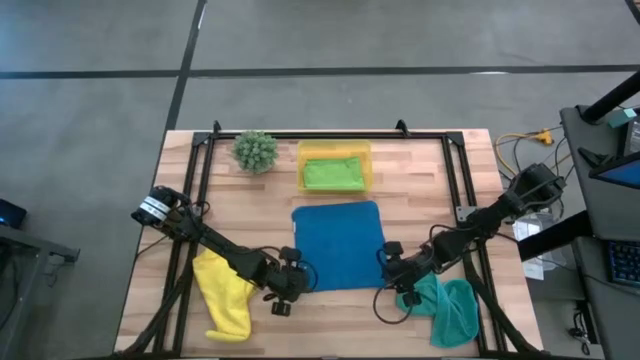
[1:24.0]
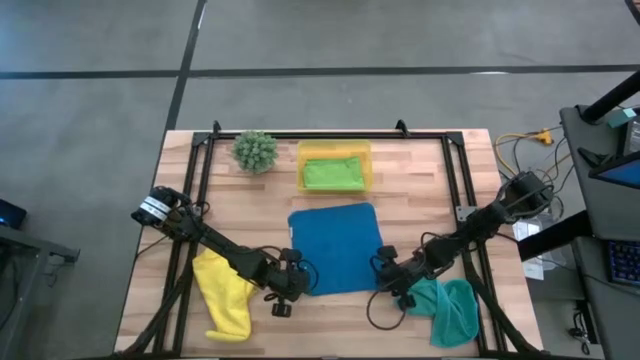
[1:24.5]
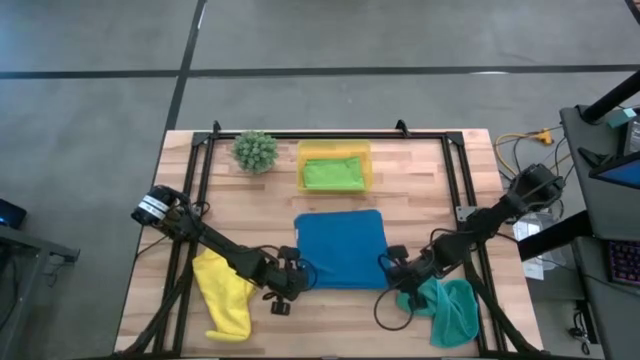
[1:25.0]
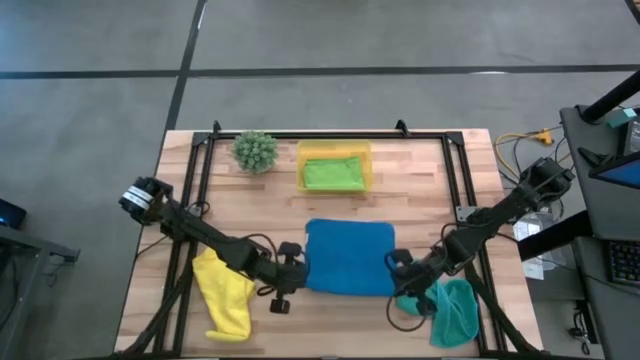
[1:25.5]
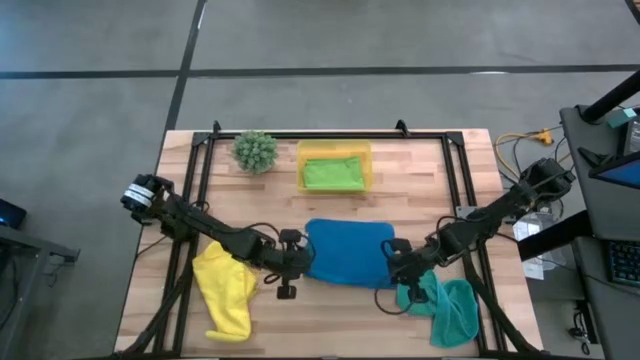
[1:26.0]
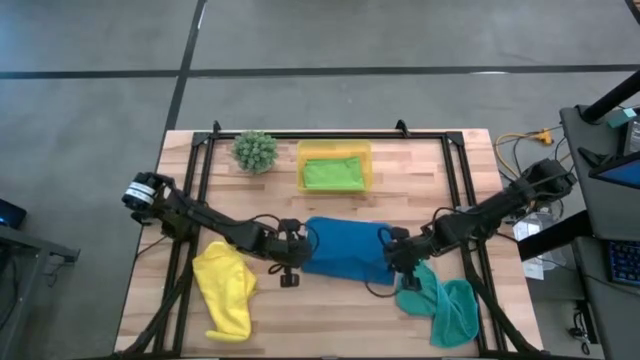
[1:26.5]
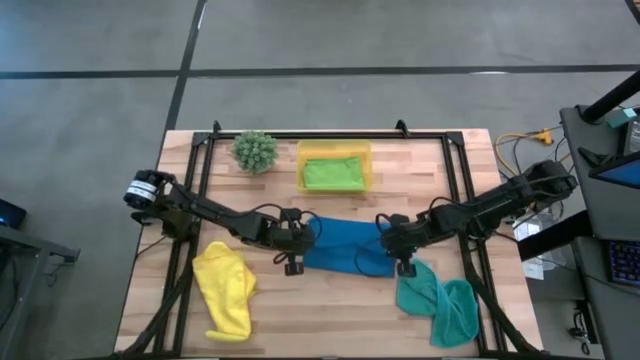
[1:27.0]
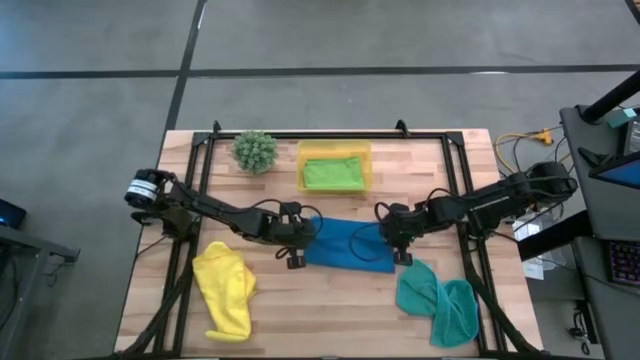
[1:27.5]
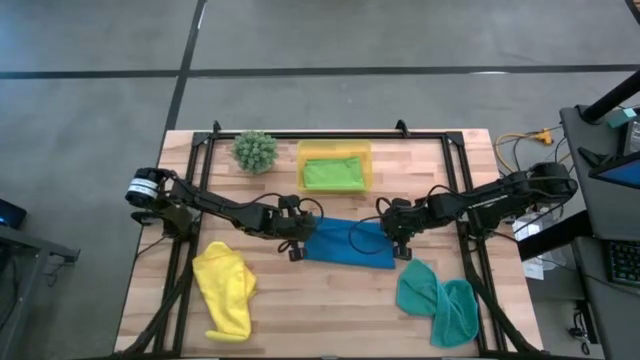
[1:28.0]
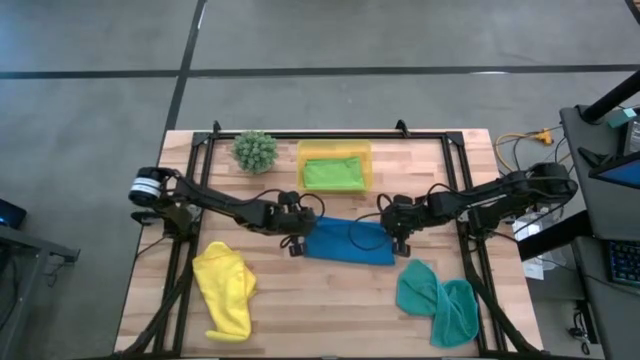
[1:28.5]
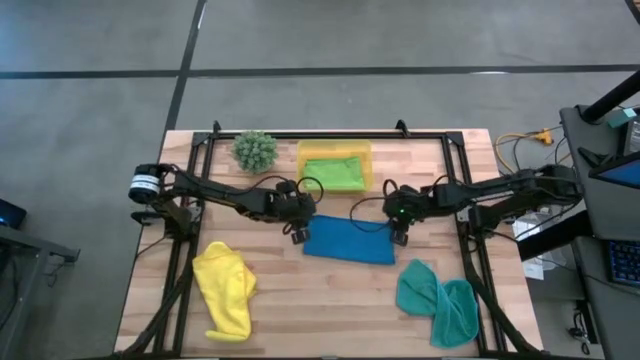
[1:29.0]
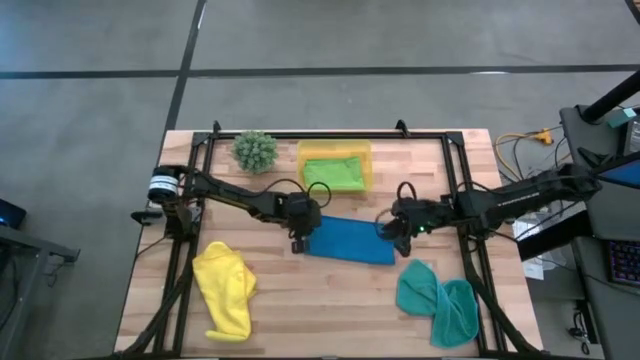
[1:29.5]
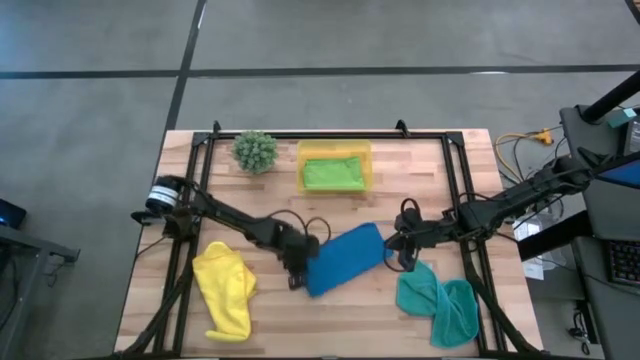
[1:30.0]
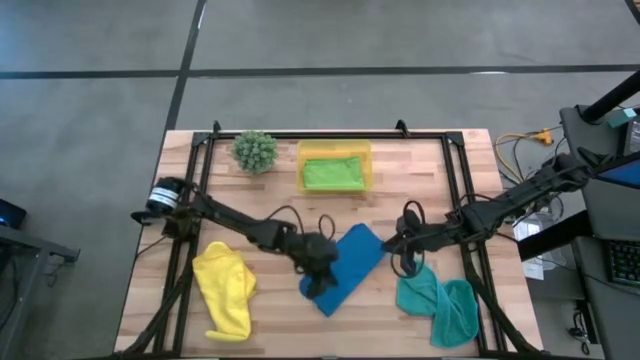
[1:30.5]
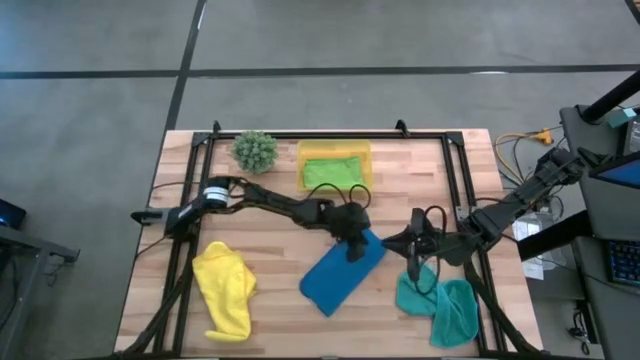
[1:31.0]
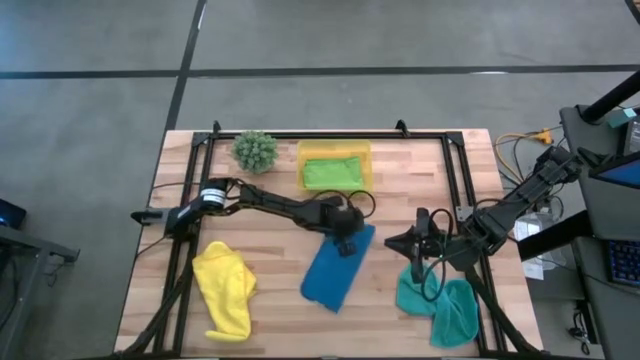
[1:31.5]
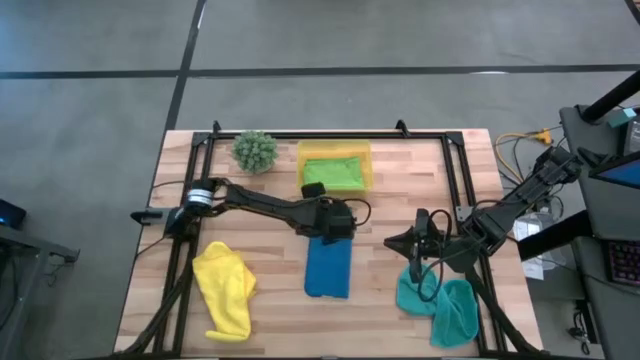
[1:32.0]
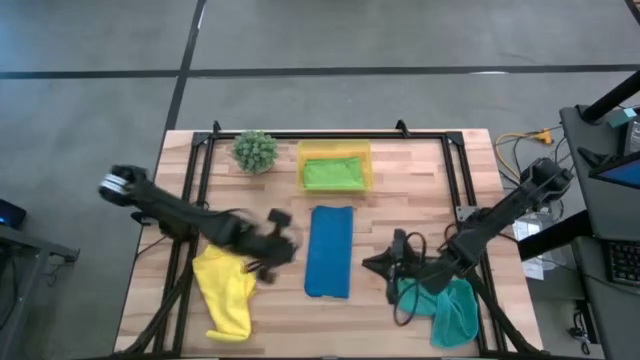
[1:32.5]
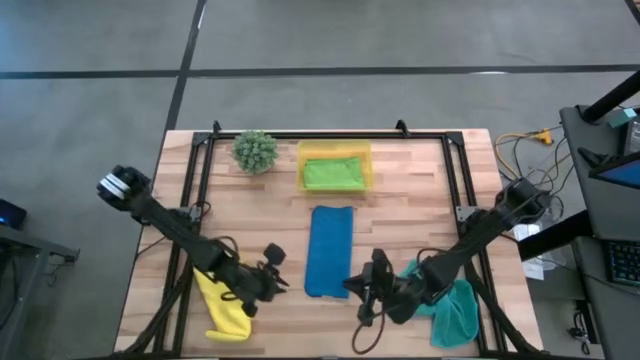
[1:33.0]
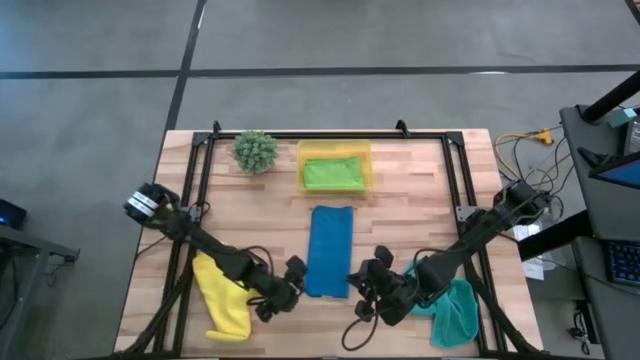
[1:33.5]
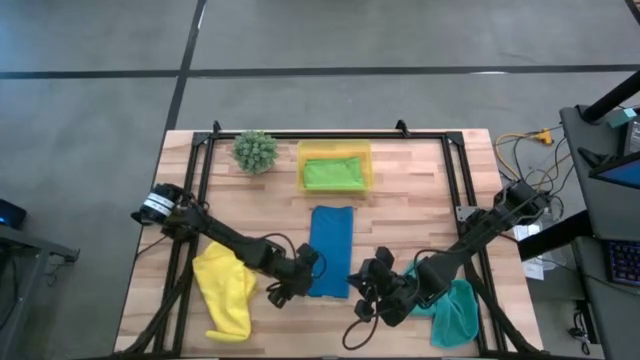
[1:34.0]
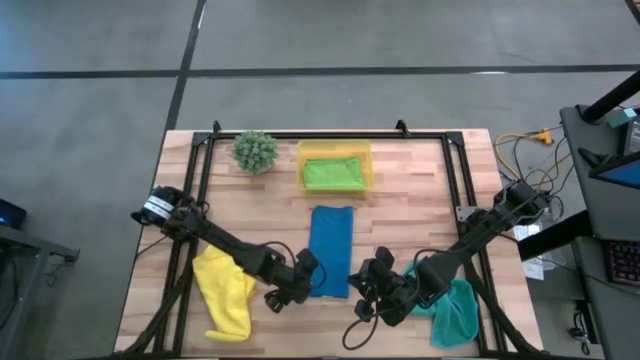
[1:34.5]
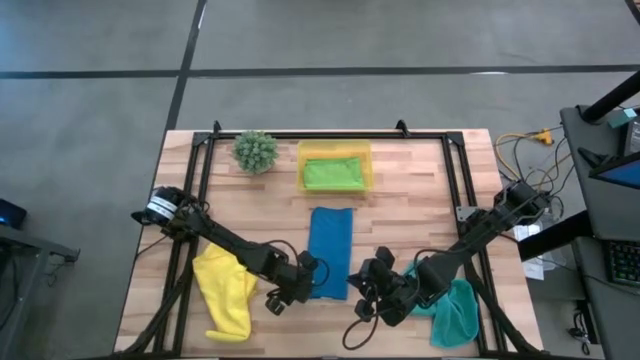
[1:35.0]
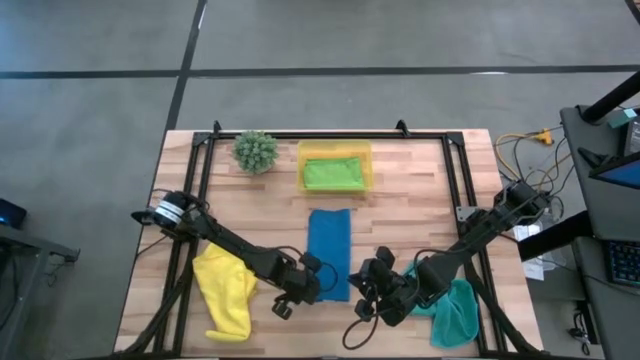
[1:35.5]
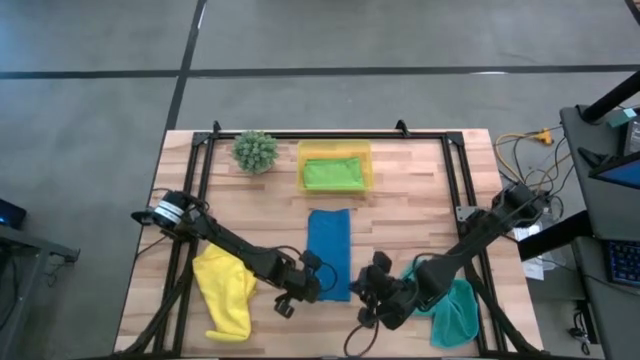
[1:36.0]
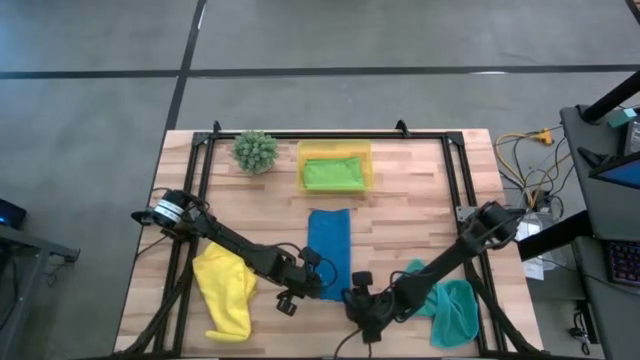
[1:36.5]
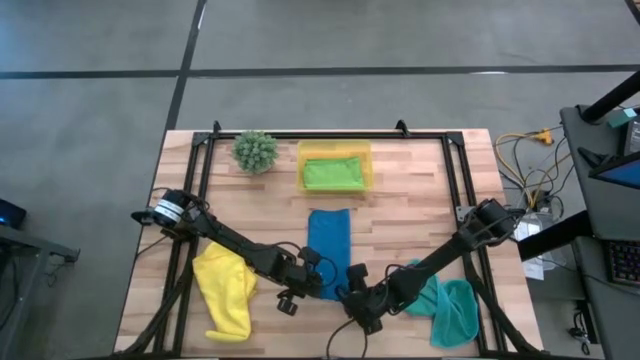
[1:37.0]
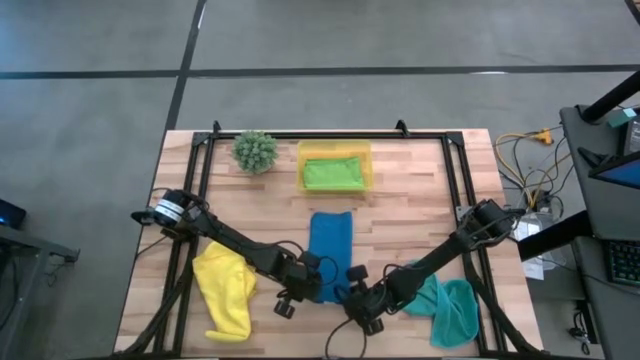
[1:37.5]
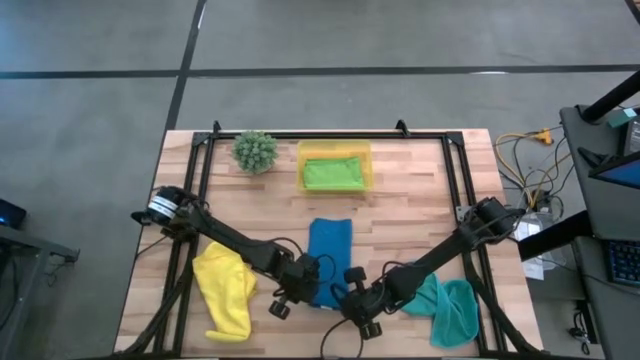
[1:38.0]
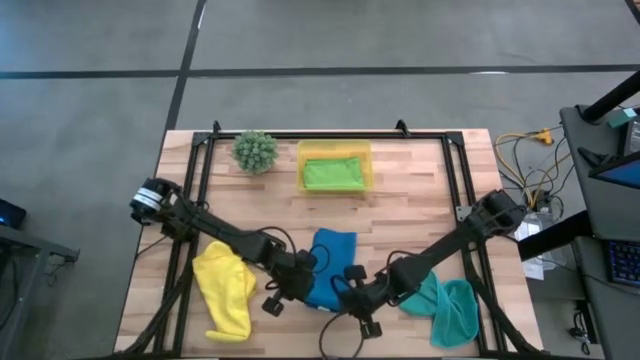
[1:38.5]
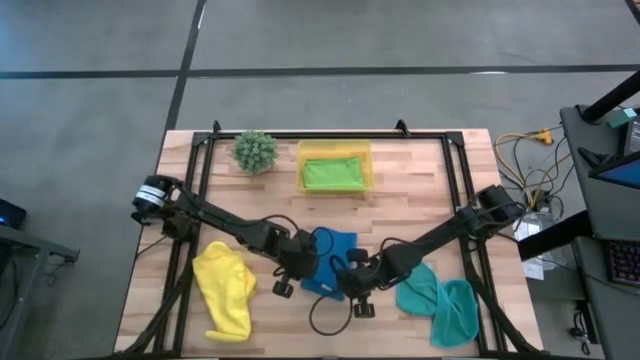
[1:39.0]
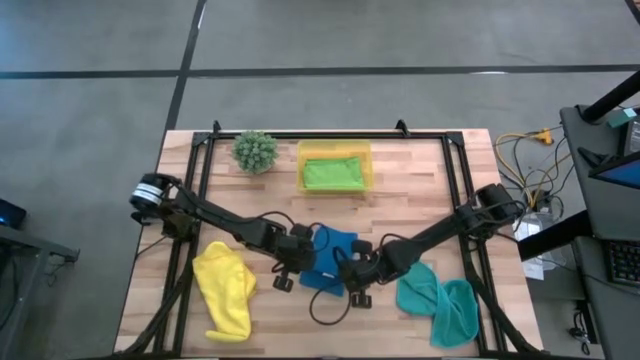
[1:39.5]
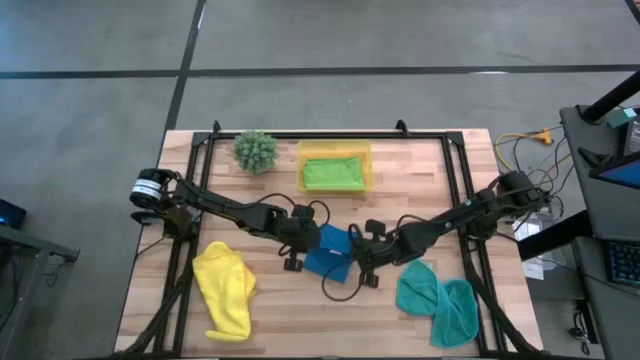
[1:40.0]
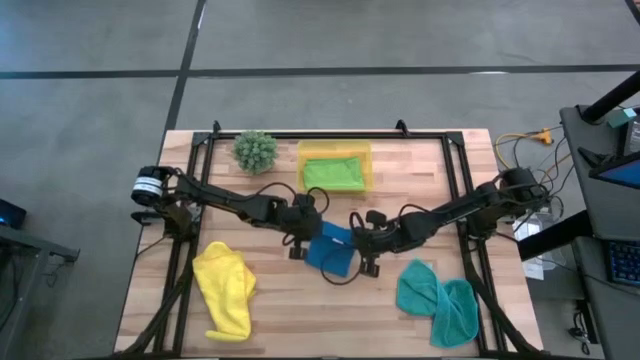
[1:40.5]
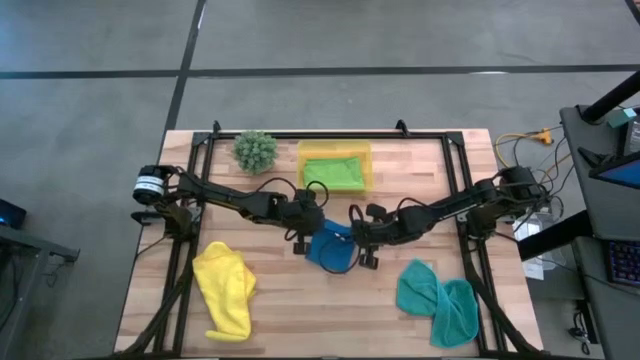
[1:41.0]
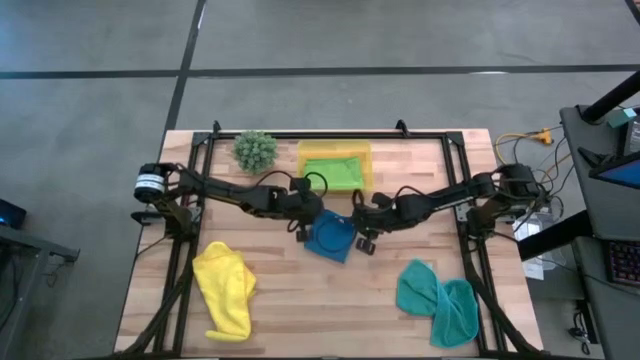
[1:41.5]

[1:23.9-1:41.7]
Task: Fold microfiber towels
Fold the blue towel

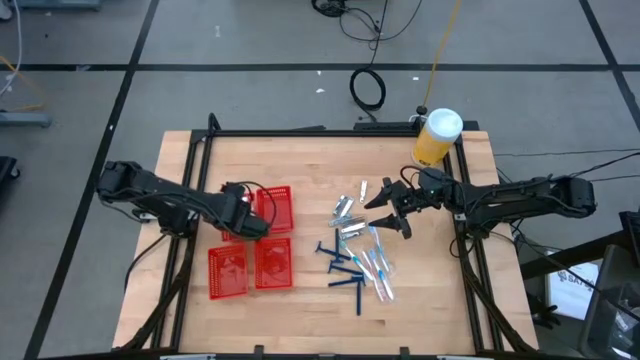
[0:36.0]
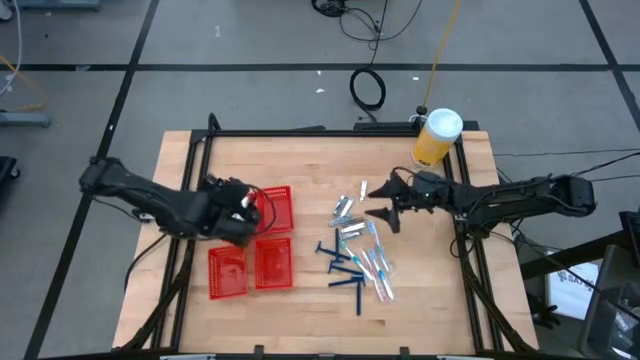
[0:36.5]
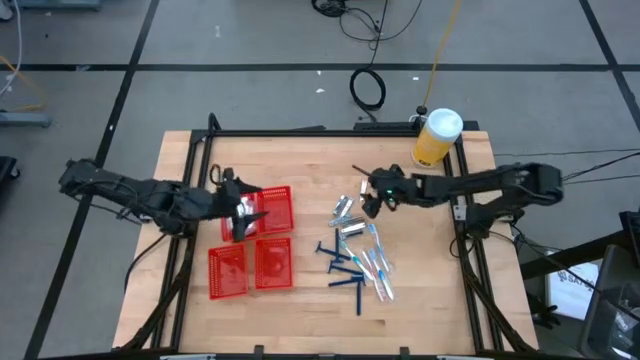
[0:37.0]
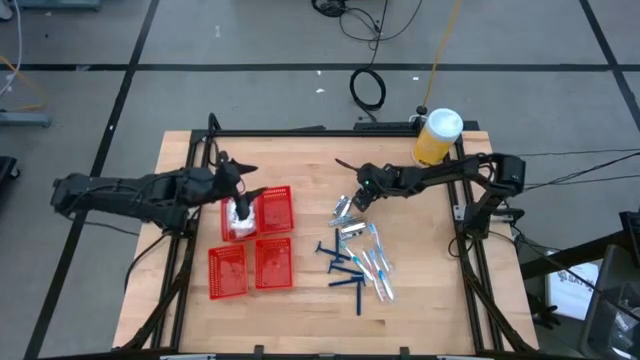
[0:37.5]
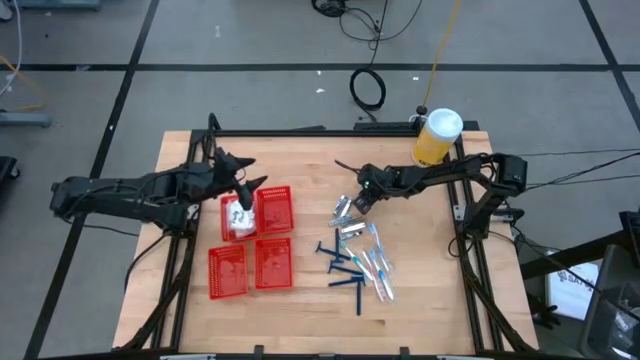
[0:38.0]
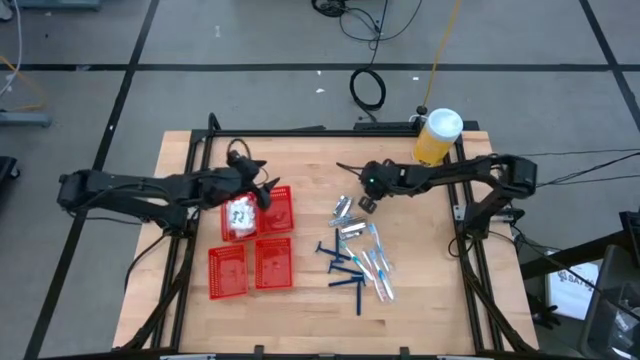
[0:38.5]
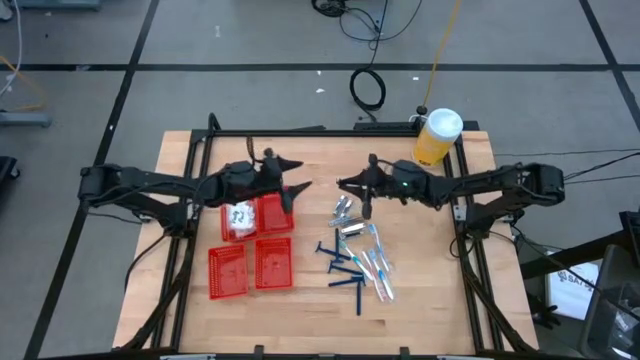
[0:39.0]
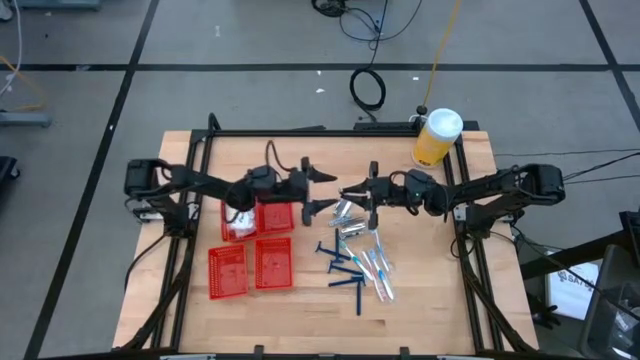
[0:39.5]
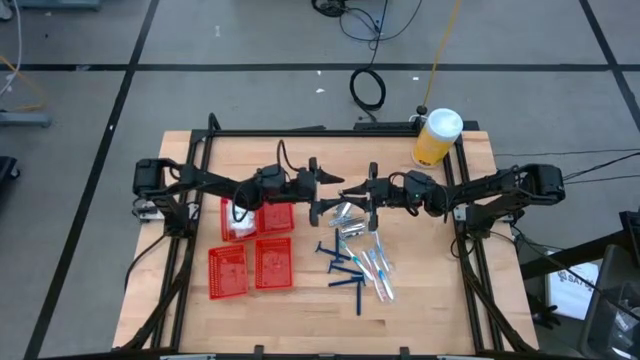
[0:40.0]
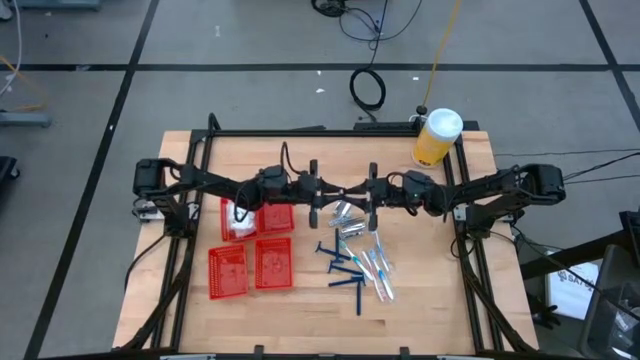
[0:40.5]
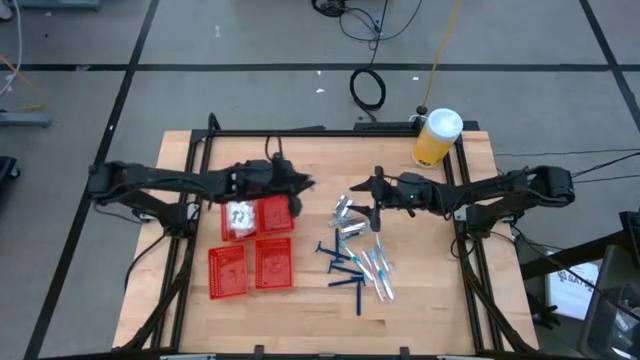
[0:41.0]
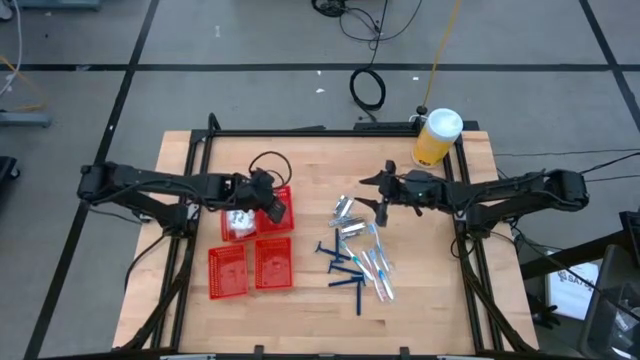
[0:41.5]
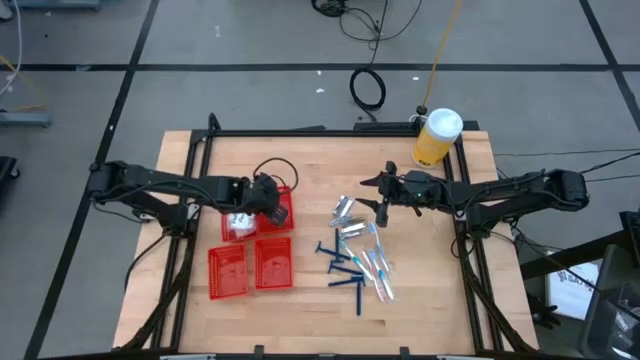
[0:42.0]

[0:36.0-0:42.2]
Task: Pick & Place Travel size toiletries
Put the silver nail cutter into the top right red basket
